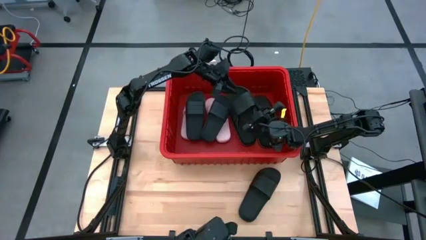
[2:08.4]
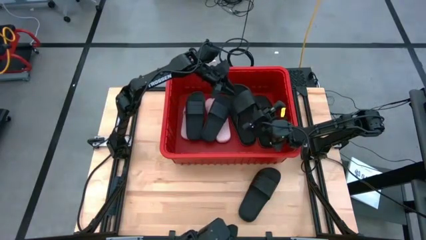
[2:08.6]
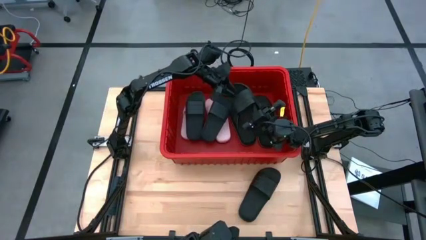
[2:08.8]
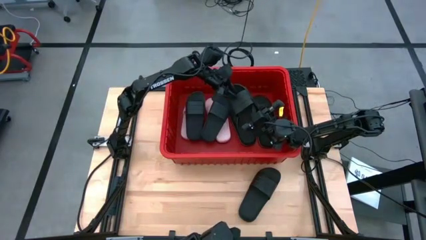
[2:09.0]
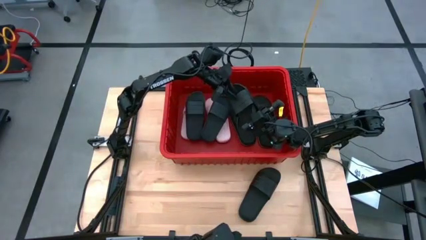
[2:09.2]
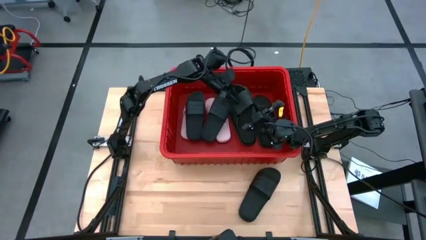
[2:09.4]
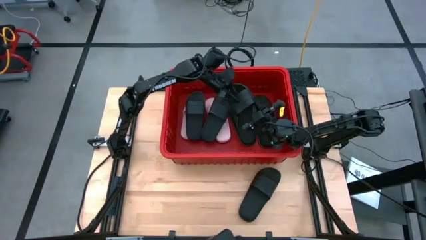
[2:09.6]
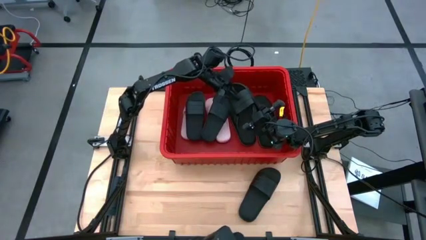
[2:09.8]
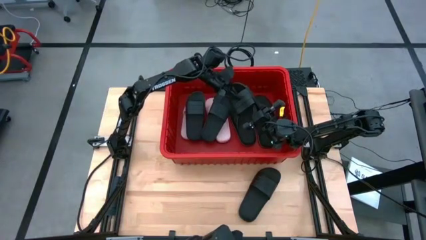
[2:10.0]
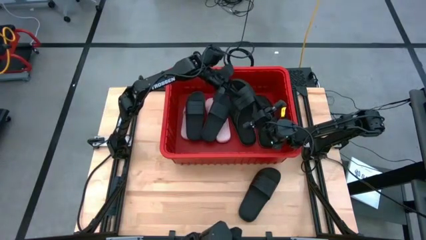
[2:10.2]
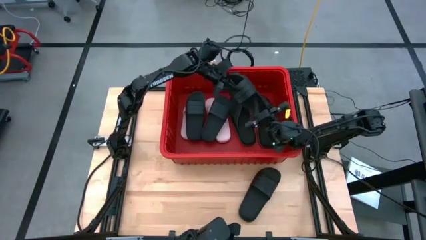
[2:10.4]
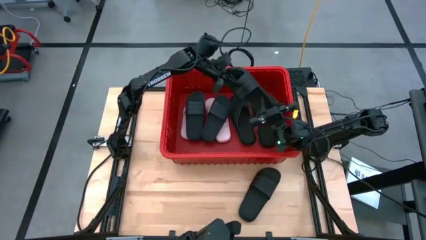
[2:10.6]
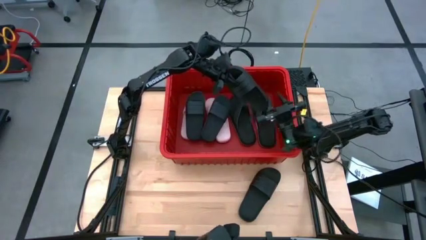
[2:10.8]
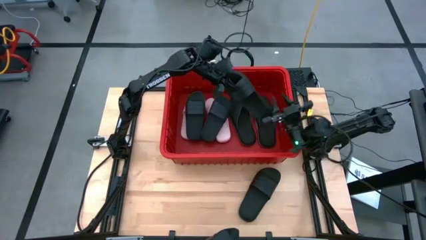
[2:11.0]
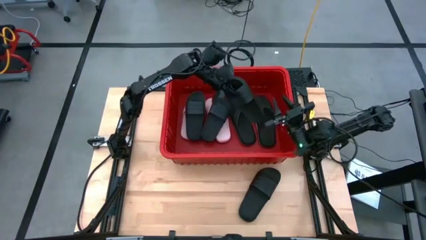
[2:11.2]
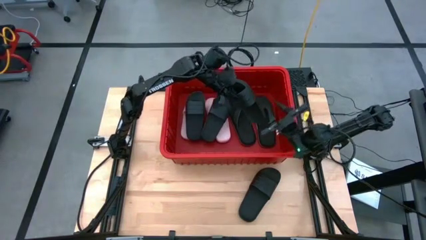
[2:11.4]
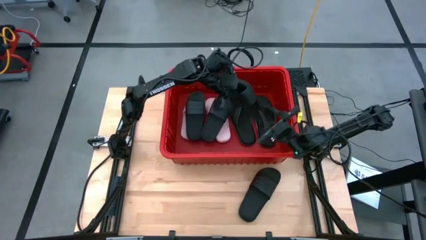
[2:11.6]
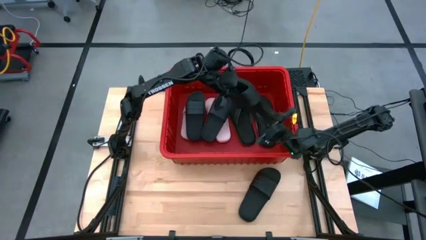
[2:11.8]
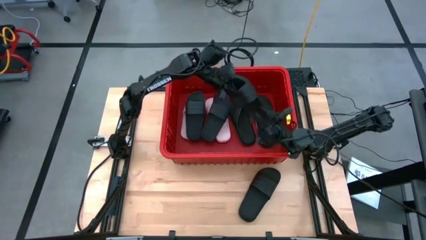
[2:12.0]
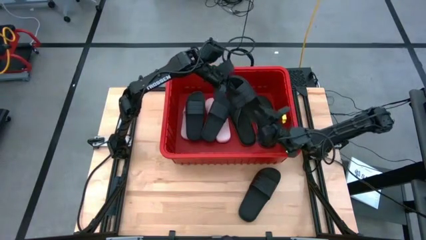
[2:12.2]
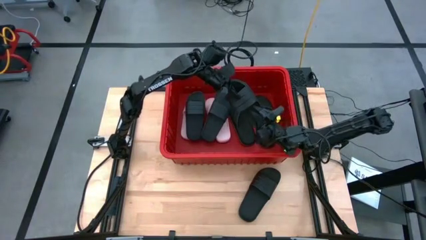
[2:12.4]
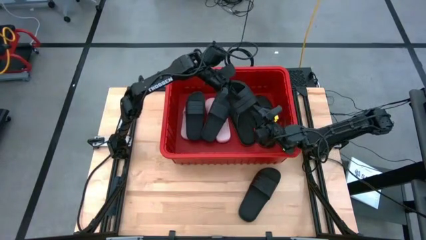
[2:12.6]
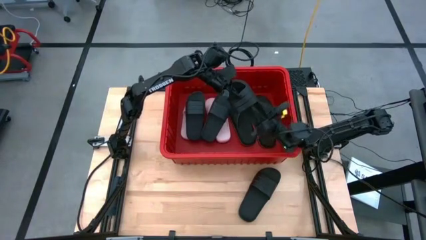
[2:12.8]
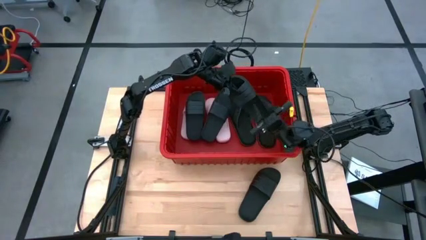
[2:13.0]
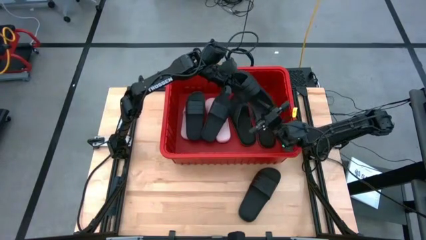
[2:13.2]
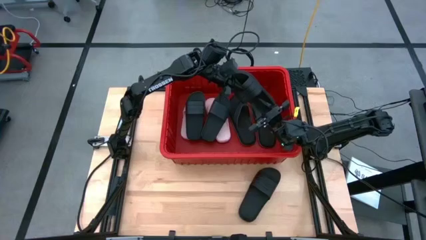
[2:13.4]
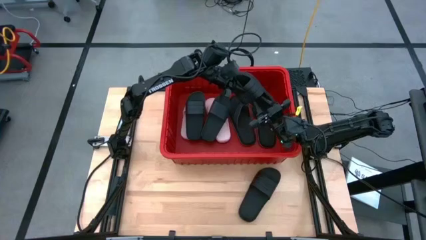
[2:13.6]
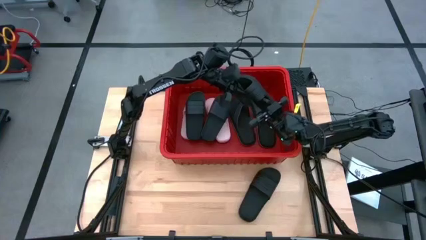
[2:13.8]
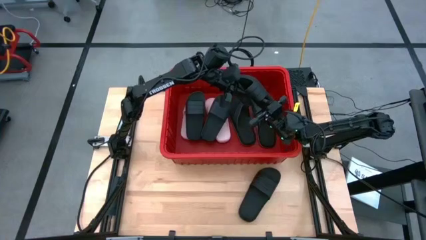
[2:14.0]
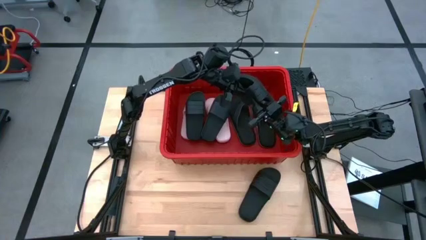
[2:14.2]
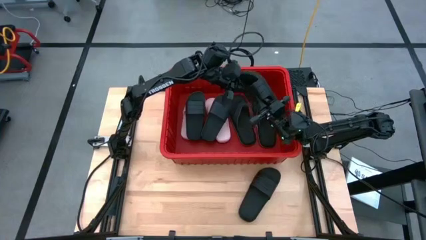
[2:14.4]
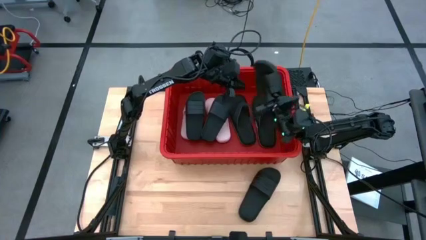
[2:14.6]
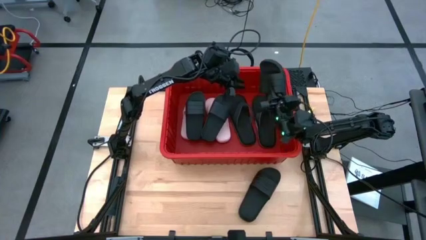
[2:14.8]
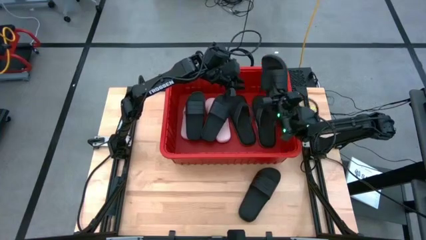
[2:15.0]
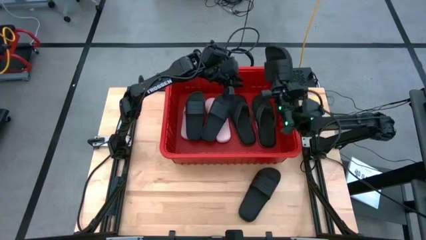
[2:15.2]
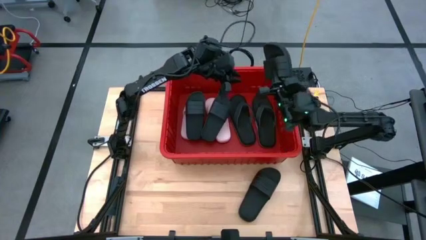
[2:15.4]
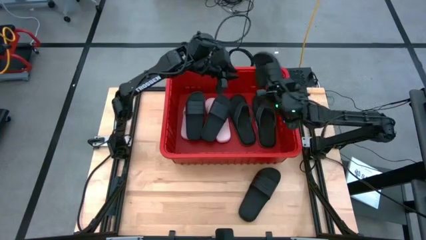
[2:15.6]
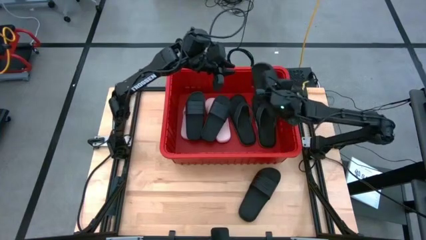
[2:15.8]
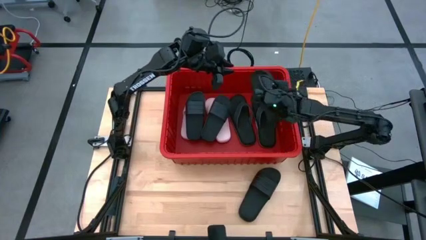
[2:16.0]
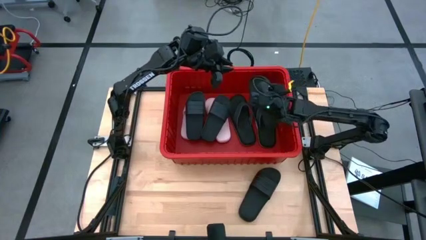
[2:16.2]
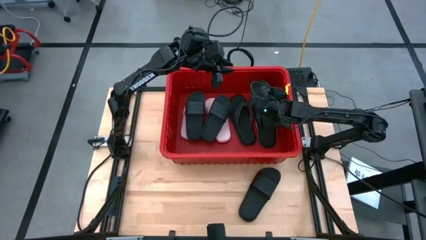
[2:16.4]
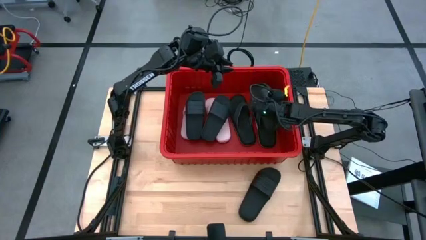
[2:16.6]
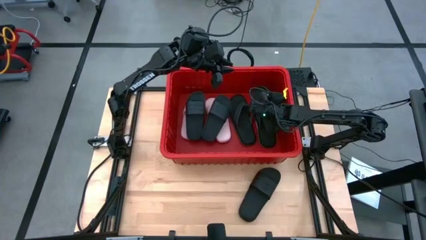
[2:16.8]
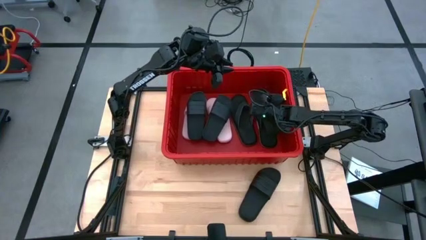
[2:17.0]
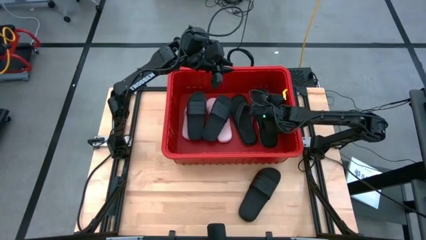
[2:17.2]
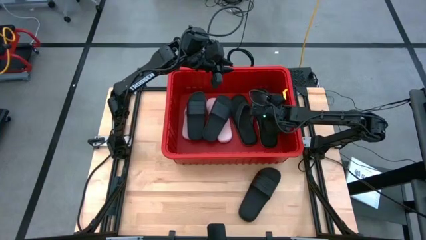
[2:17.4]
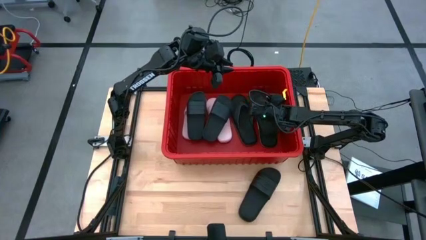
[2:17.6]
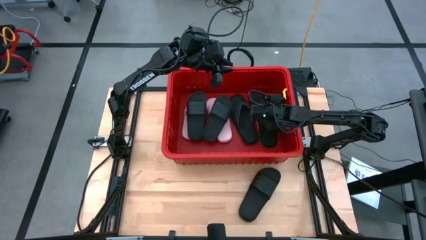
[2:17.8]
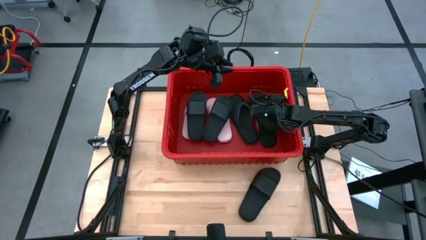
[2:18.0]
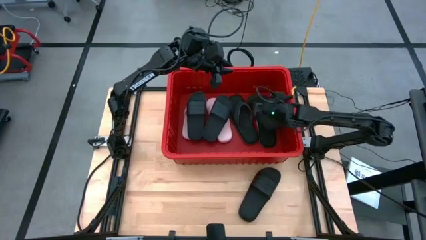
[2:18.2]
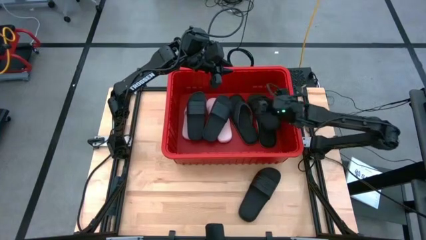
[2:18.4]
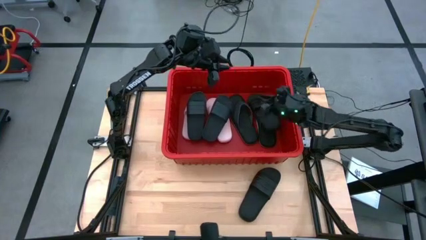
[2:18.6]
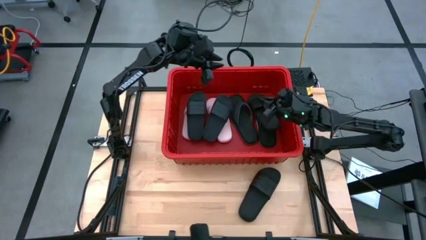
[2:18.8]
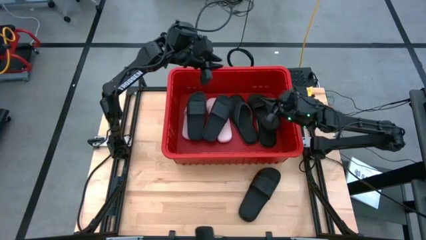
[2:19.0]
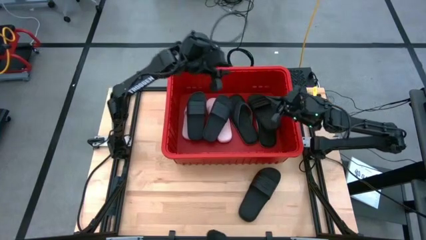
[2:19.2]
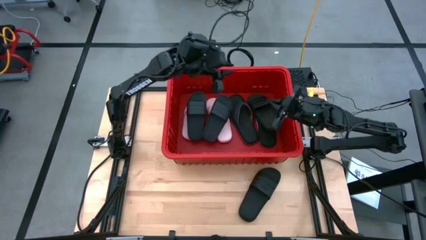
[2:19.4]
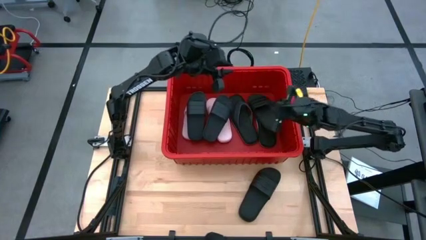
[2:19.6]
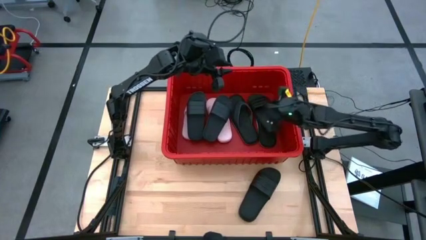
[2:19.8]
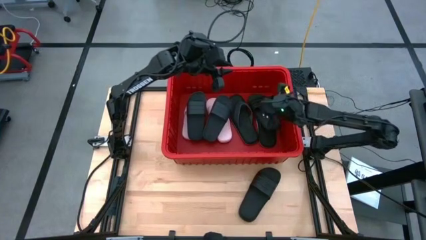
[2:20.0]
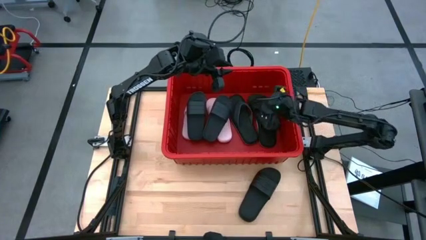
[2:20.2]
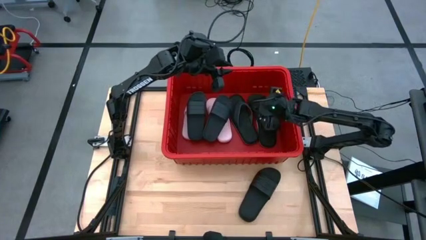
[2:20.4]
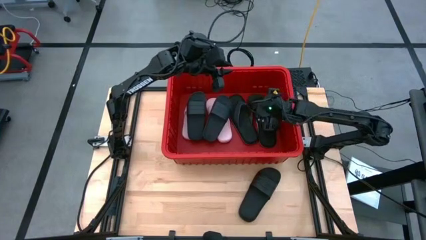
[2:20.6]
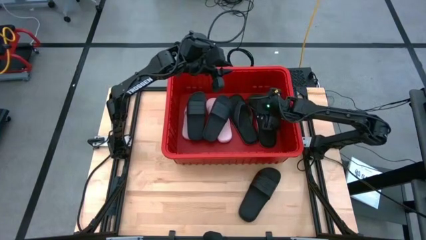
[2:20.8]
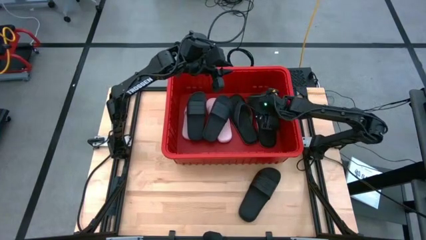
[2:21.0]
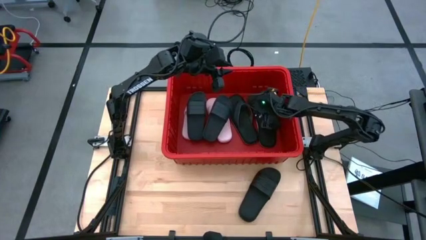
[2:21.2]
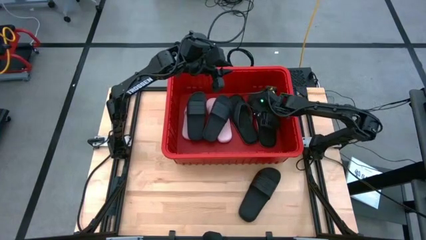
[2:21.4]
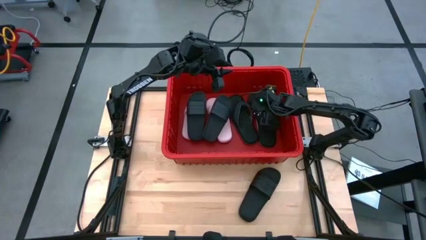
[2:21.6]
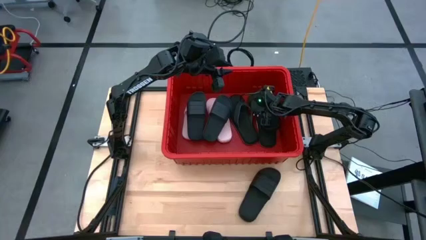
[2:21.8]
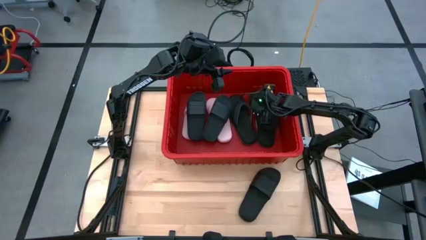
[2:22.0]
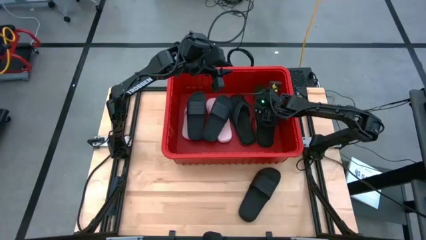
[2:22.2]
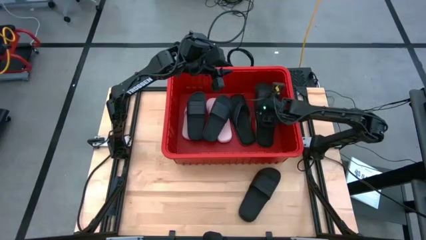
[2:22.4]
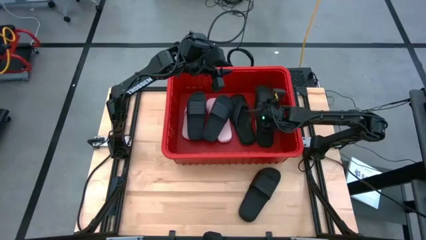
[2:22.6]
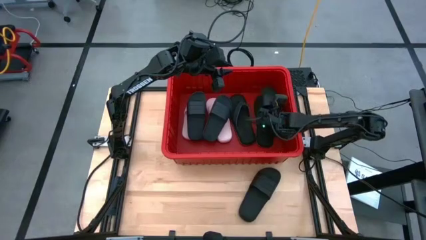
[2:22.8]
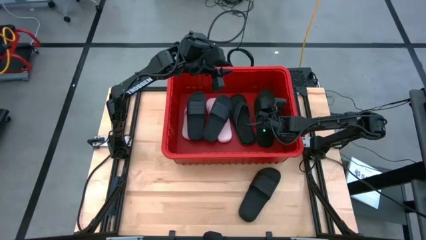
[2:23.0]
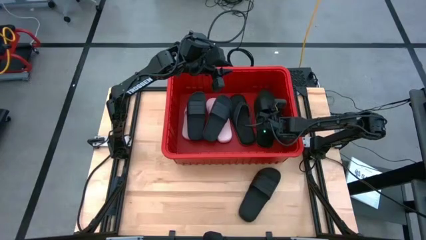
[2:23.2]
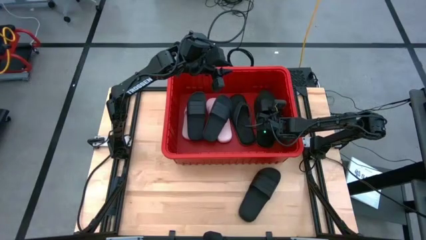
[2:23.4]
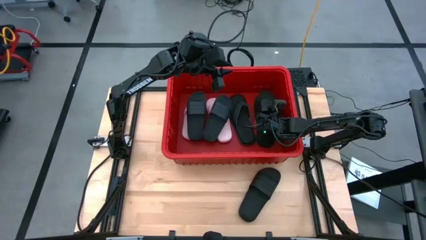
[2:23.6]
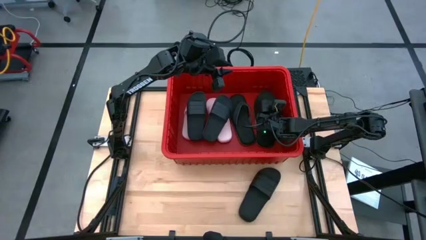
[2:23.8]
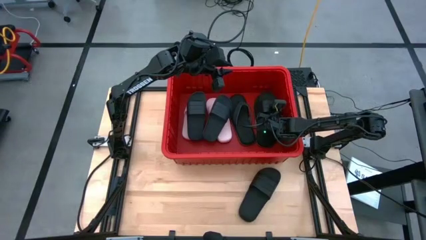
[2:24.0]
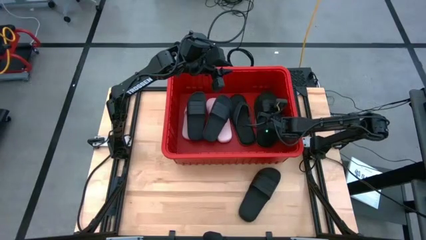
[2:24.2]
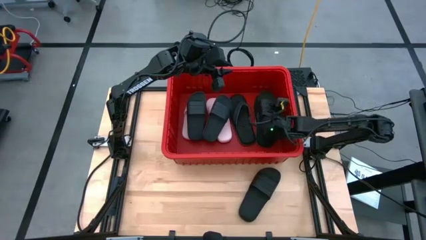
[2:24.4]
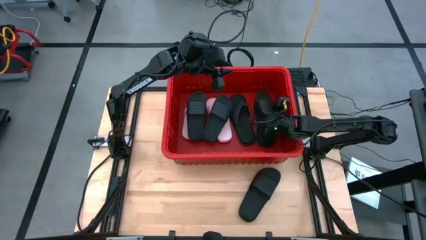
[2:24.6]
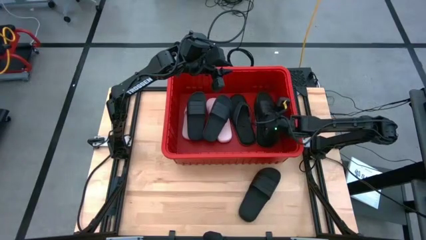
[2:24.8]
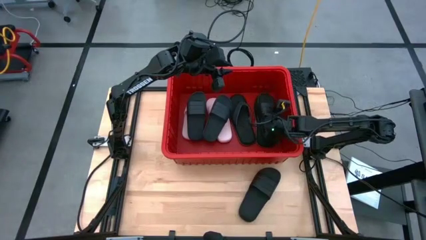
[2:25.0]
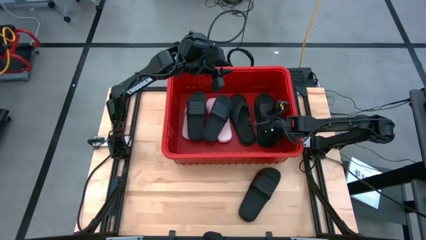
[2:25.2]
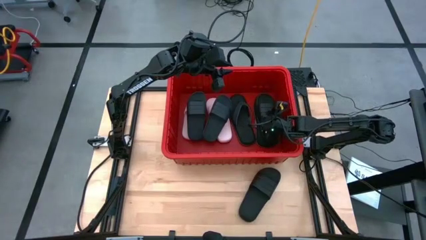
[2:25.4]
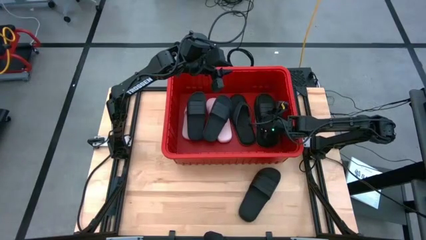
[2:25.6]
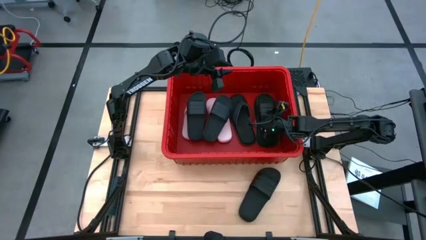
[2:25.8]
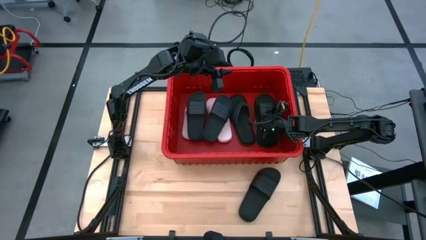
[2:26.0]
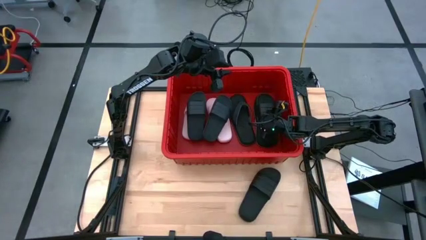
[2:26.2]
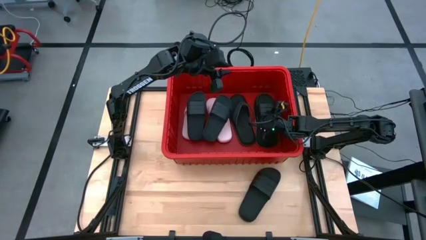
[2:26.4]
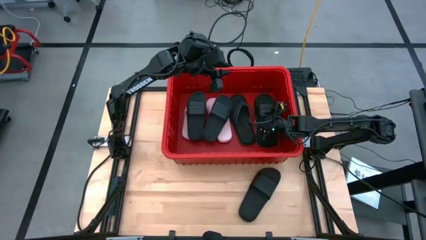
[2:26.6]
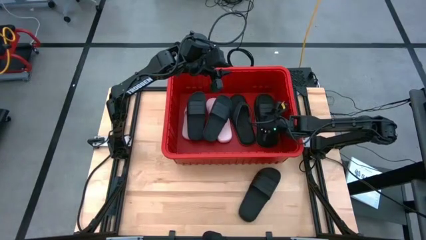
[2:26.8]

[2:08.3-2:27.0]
Task: Pick and place slides into bin
Put the black slipper into the red bin
